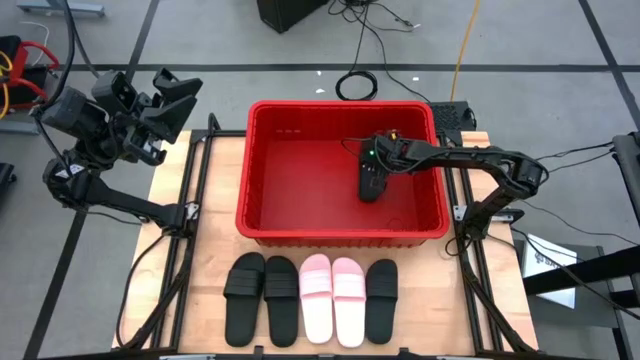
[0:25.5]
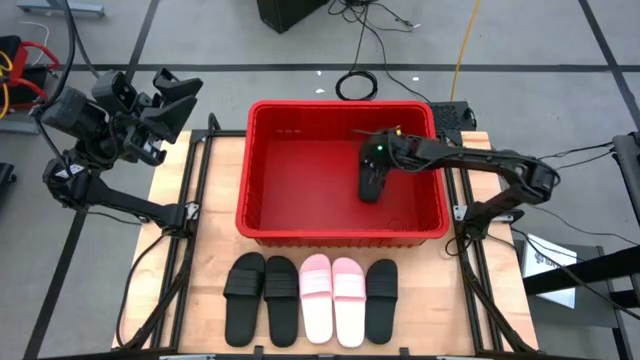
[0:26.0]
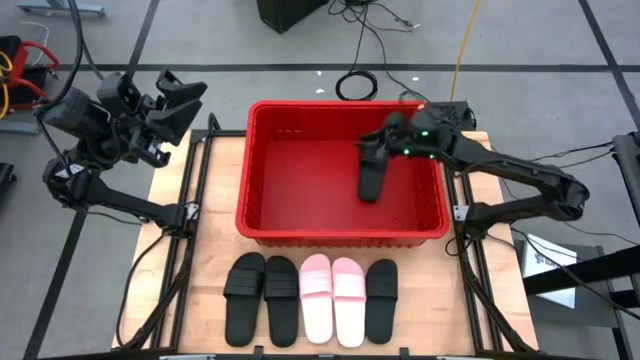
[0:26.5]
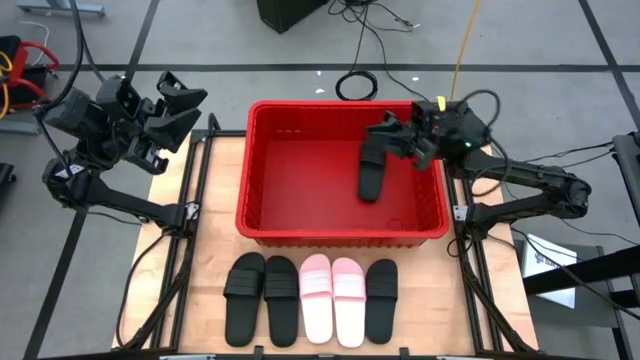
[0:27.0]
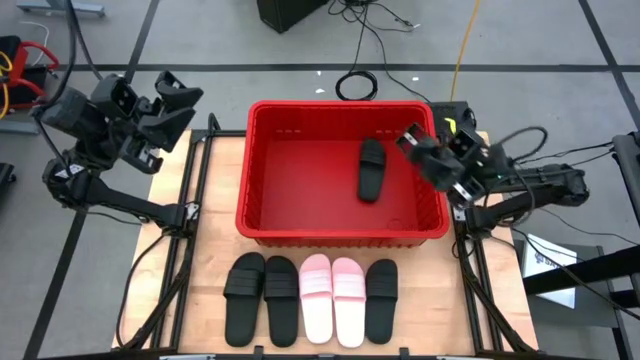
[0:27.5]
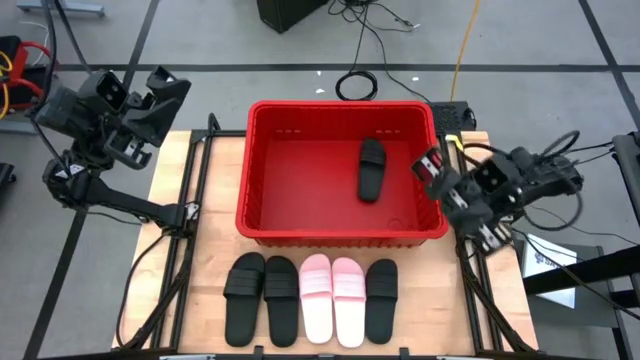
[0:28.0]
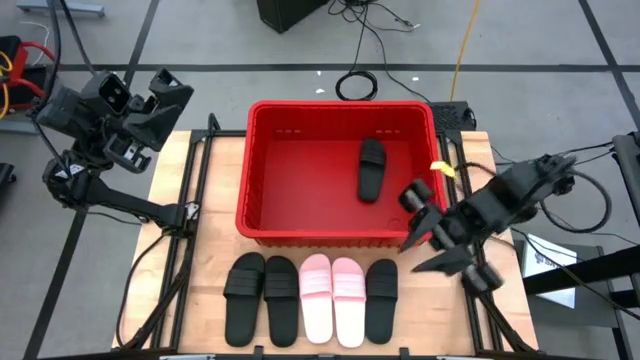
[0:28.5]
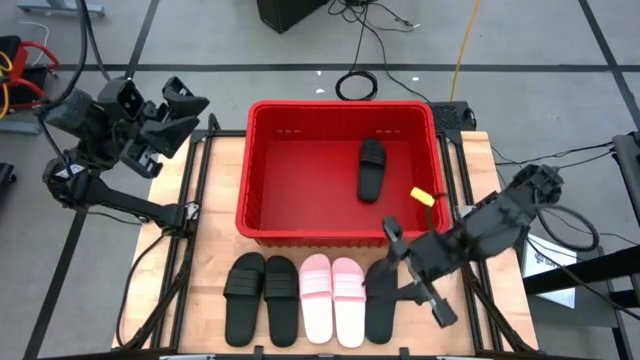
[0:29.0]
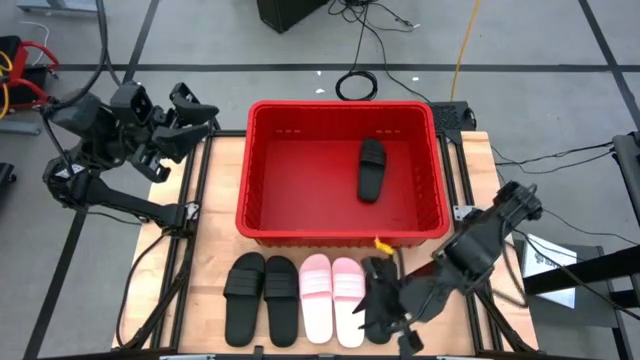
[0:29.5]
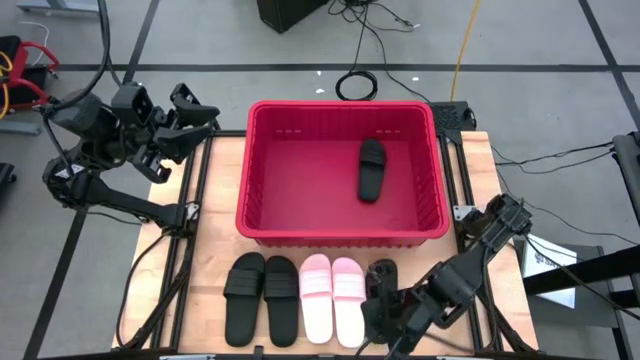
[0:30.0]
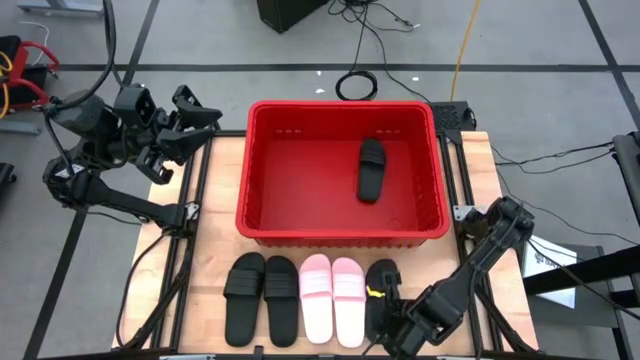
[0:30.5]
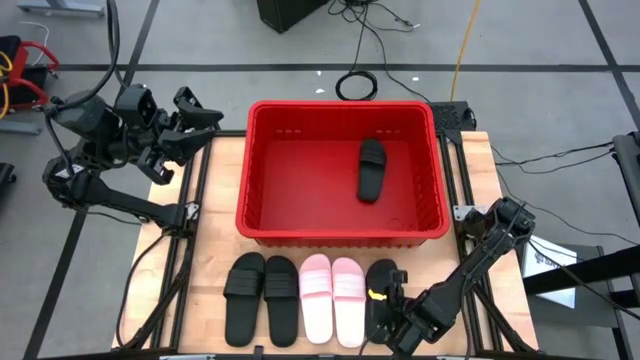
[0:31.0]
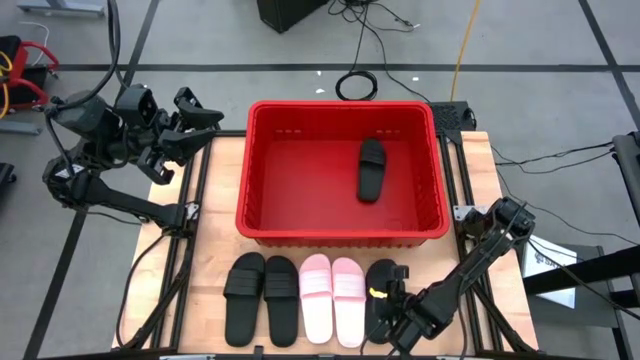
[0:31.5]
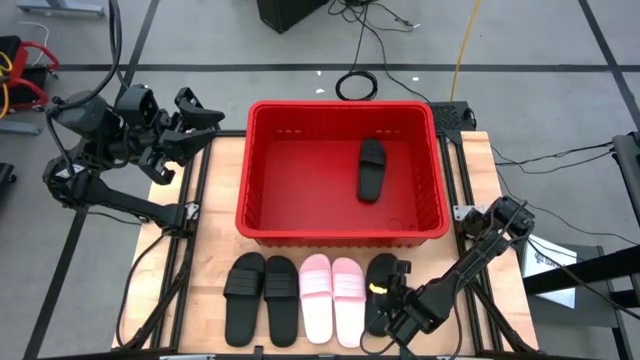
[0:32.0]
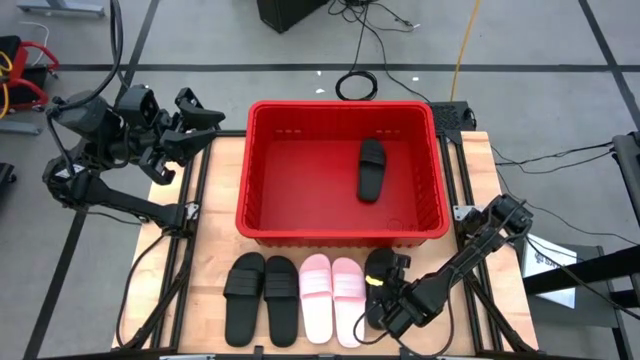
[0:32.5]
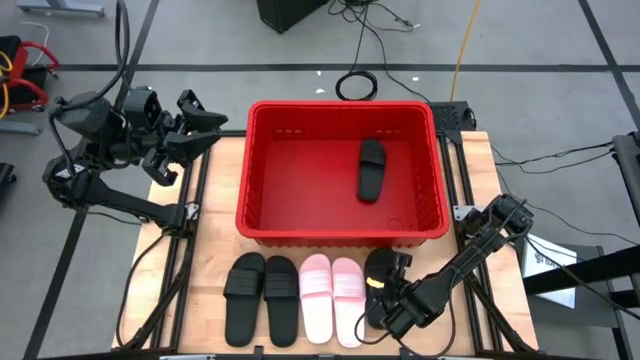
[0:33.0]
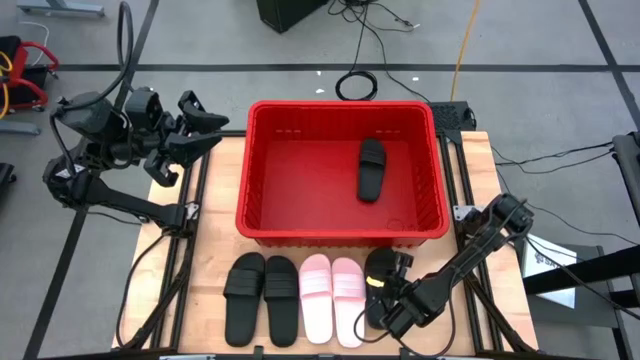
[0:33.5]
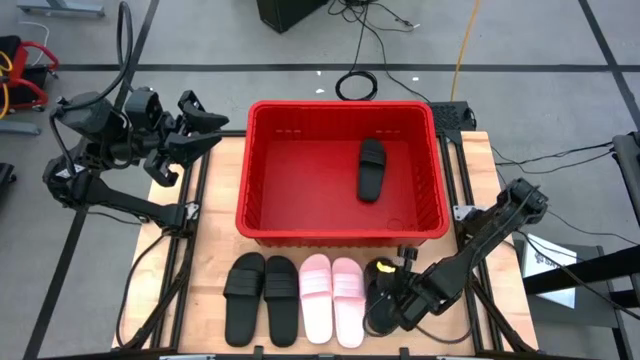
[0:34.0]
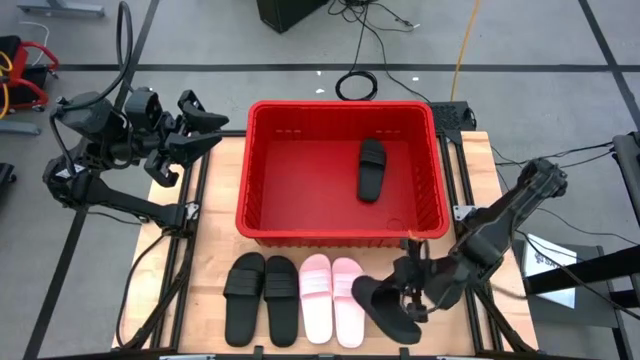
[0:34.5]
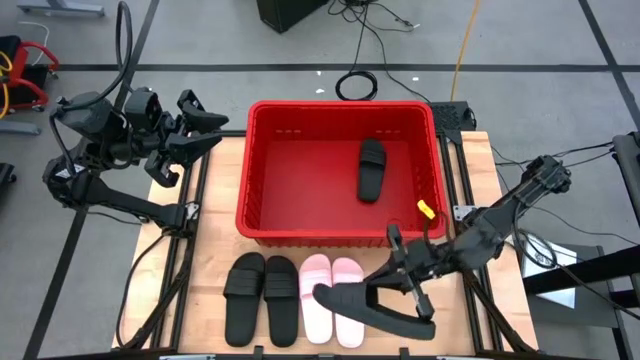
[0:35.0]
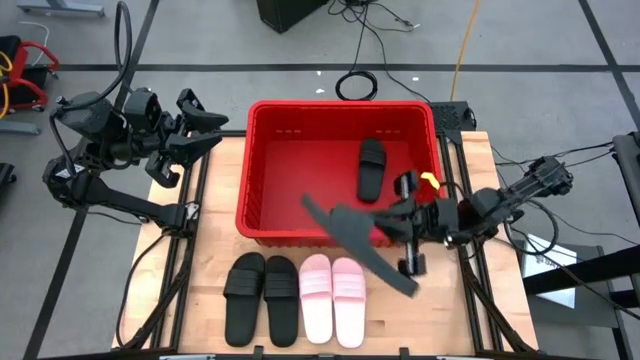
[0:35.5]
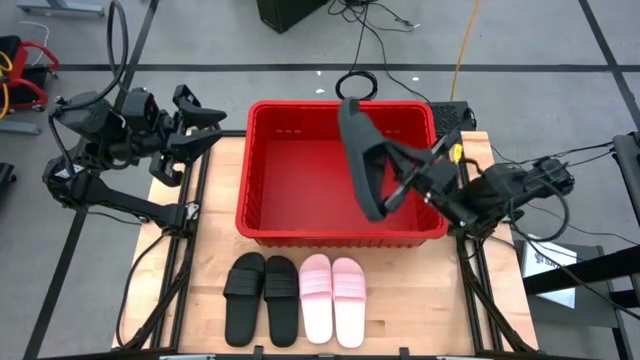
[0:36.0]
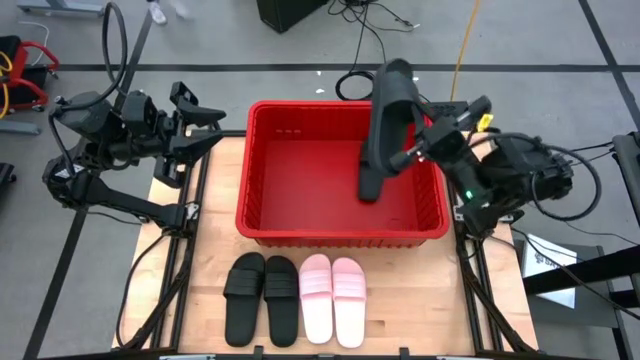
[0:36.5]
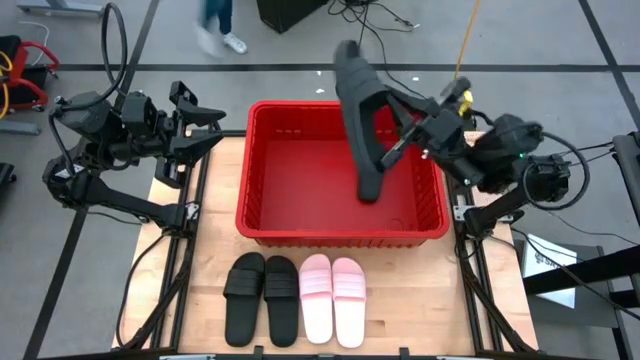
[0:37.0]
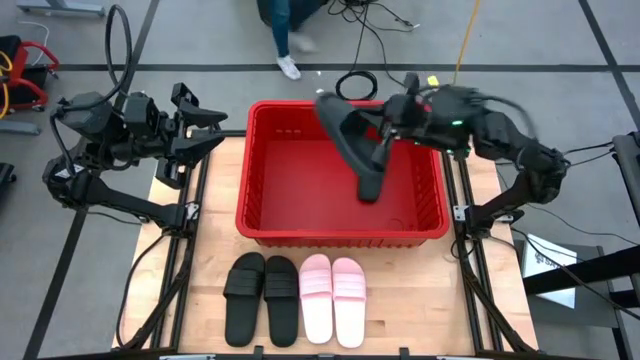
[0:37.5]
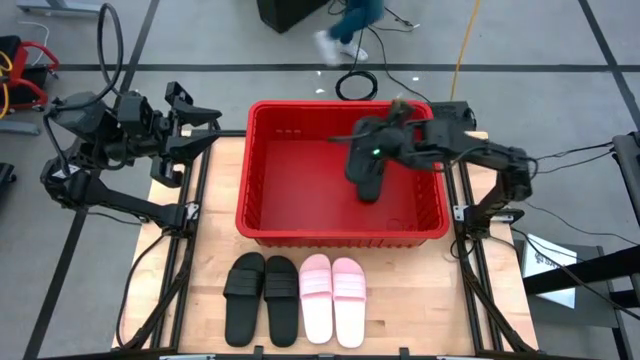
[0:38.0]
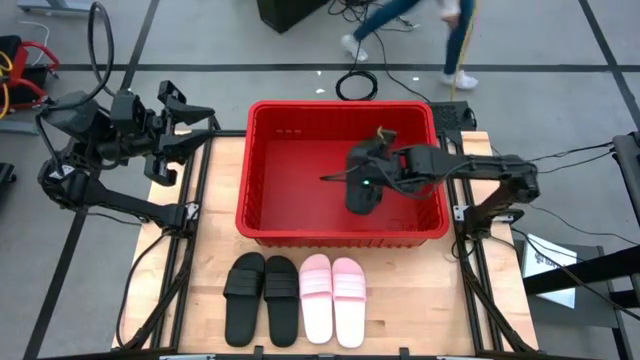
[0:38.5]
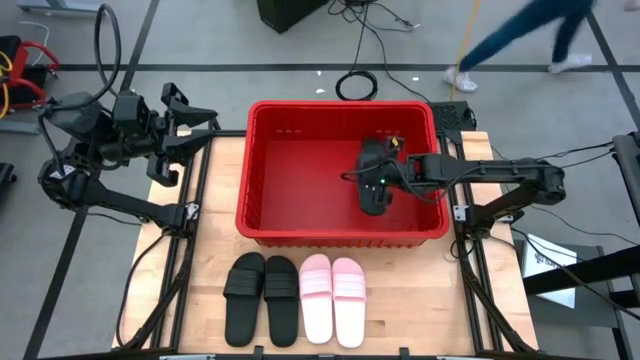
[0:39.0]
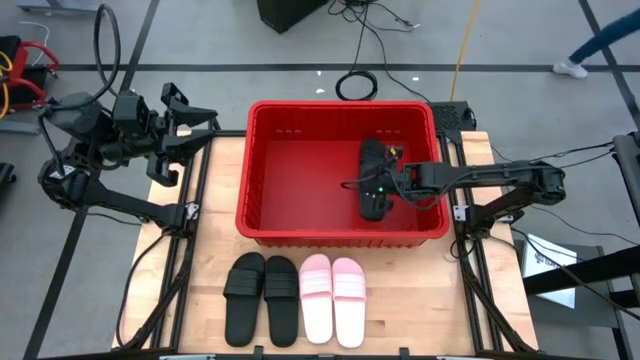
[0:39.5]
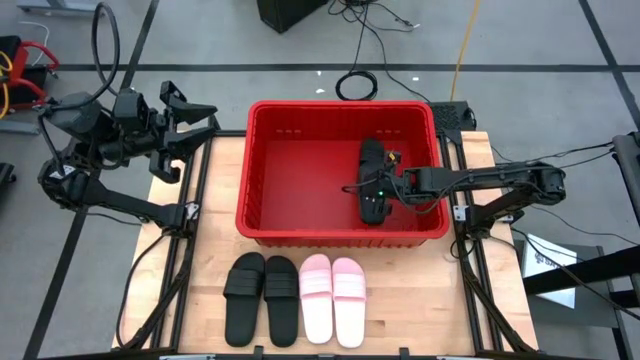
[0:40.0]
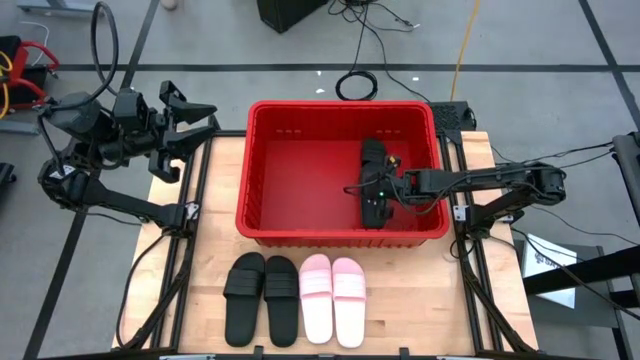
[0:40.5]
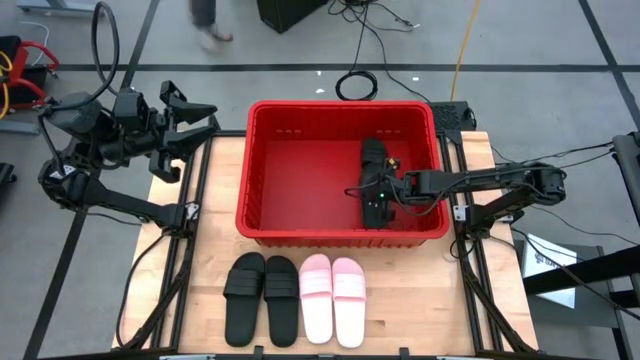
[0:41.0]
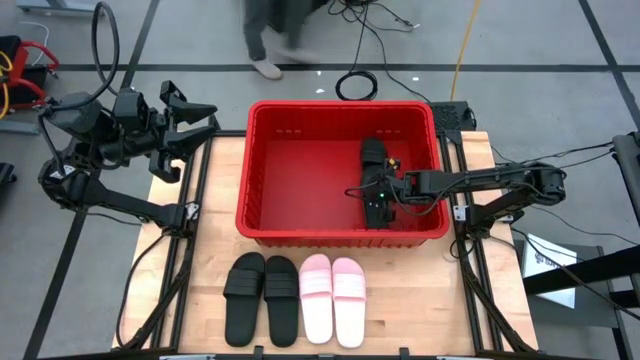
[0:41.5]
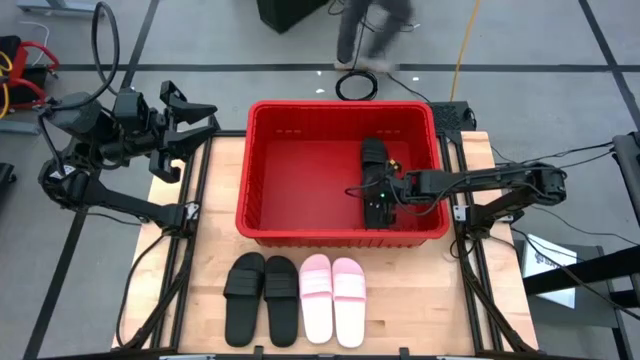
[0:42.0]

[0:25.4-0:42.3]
Task: Pick and place slides into bin
Put the black slide into the red bin
